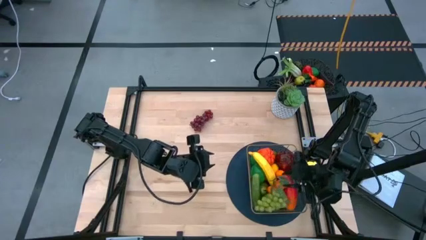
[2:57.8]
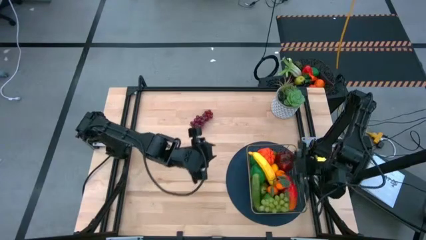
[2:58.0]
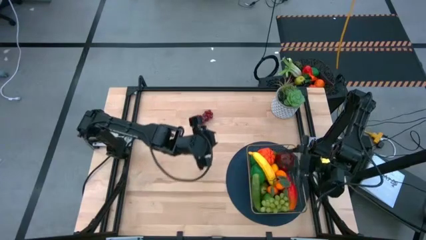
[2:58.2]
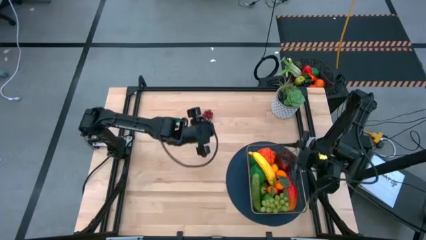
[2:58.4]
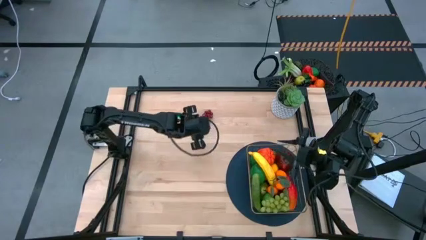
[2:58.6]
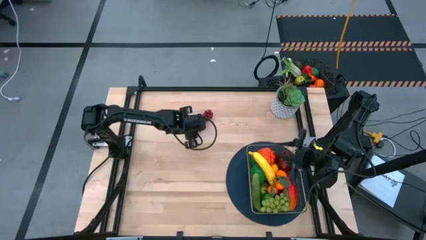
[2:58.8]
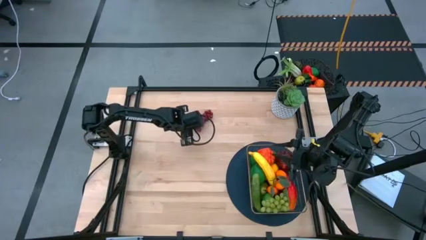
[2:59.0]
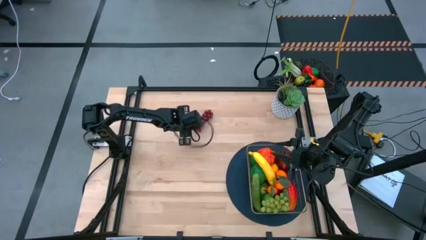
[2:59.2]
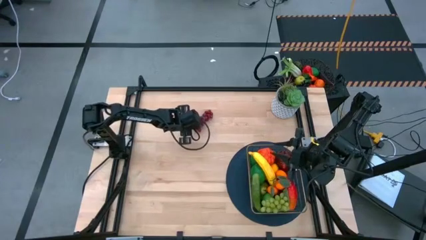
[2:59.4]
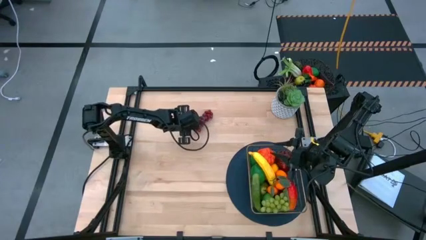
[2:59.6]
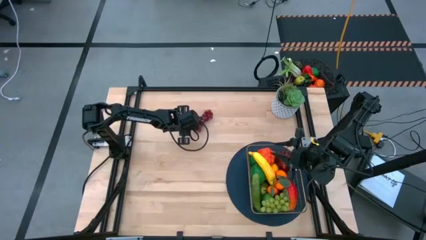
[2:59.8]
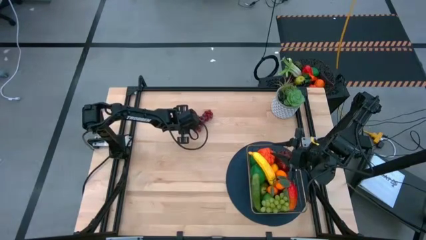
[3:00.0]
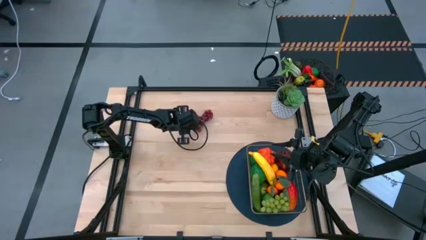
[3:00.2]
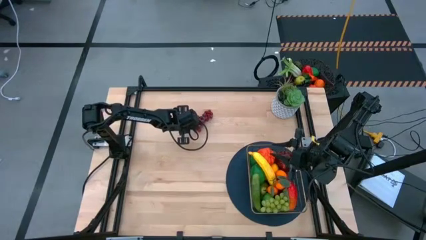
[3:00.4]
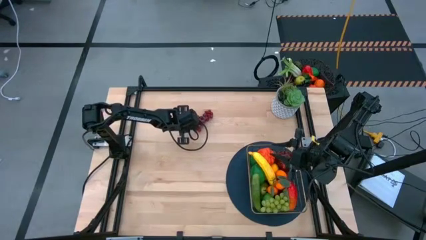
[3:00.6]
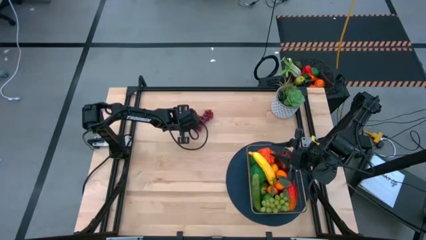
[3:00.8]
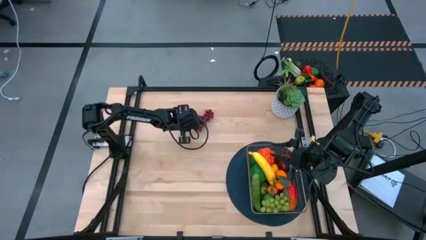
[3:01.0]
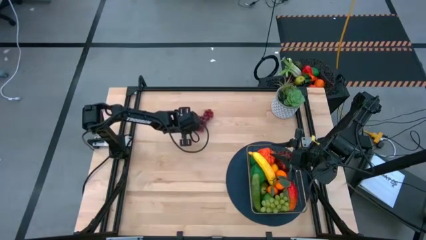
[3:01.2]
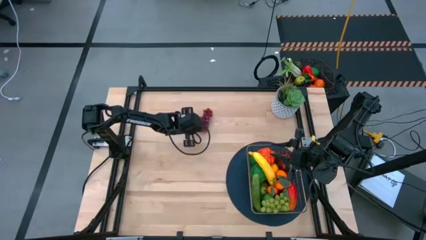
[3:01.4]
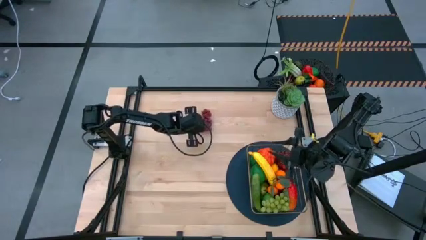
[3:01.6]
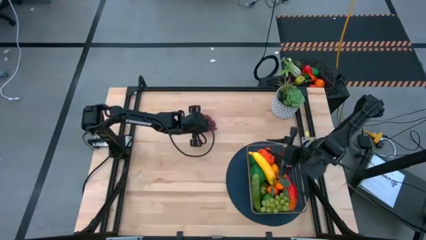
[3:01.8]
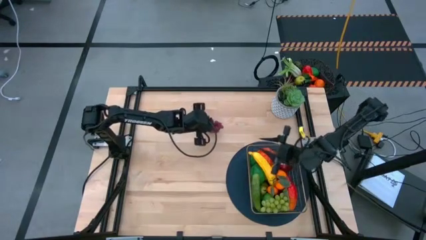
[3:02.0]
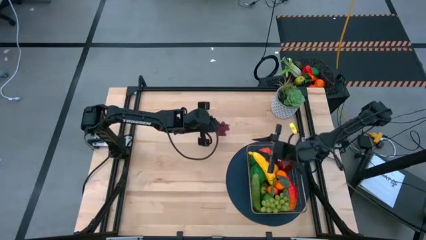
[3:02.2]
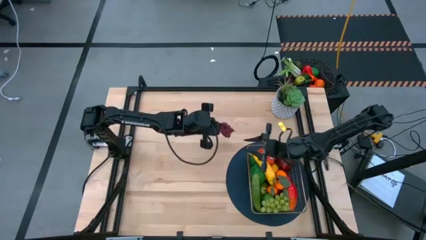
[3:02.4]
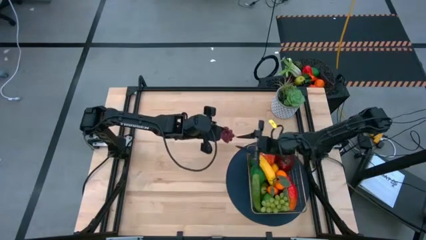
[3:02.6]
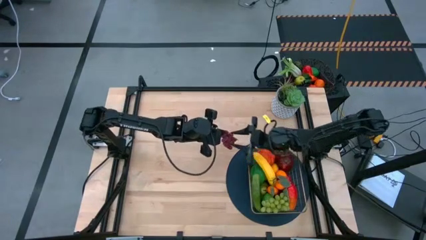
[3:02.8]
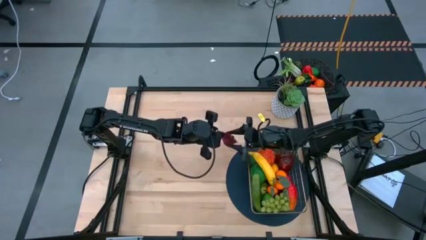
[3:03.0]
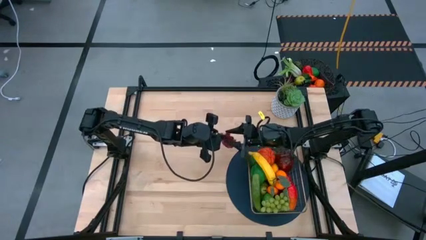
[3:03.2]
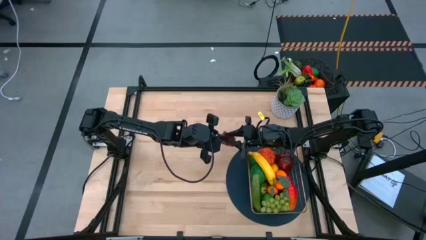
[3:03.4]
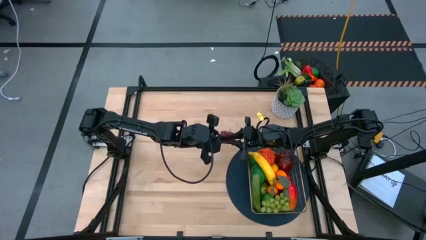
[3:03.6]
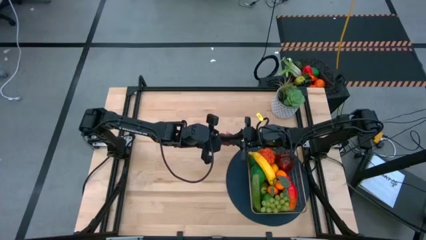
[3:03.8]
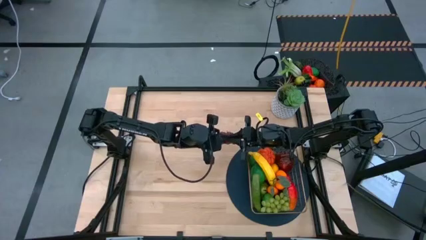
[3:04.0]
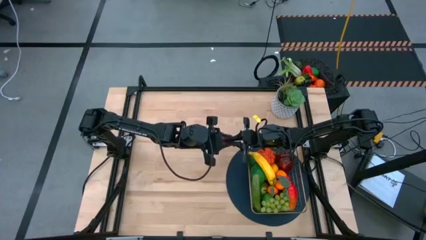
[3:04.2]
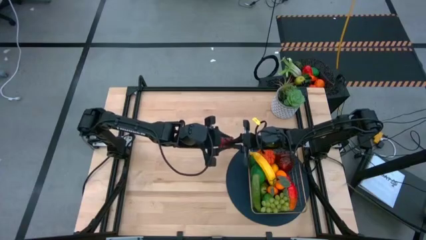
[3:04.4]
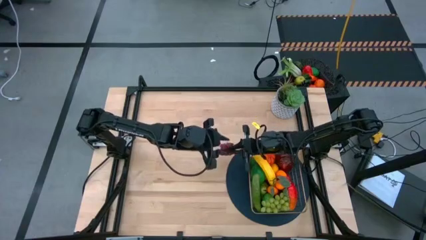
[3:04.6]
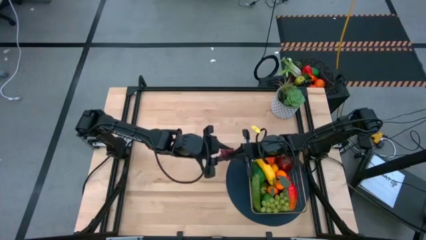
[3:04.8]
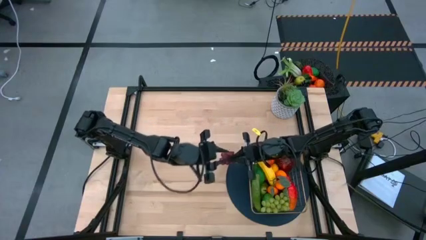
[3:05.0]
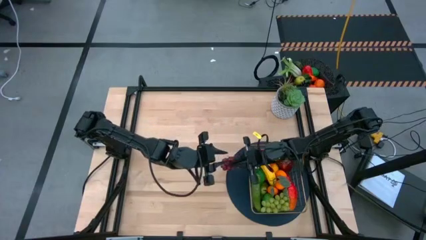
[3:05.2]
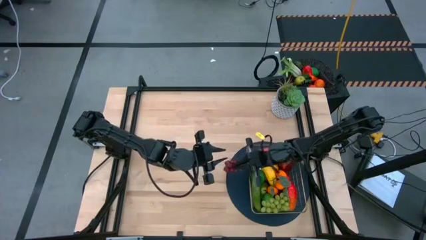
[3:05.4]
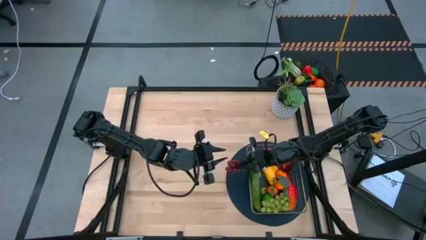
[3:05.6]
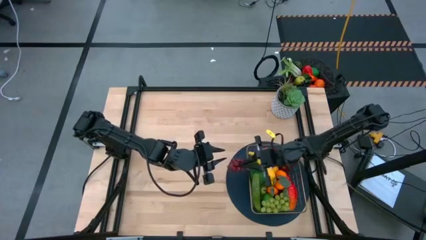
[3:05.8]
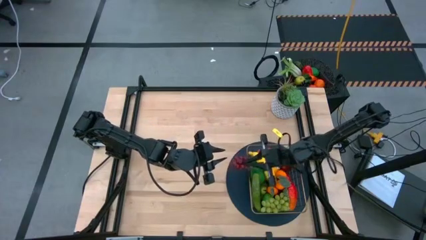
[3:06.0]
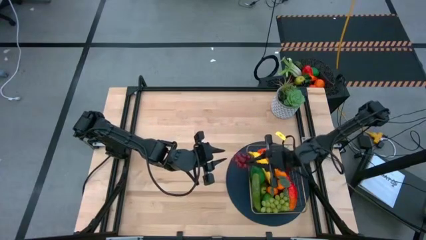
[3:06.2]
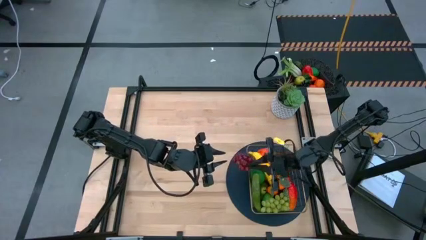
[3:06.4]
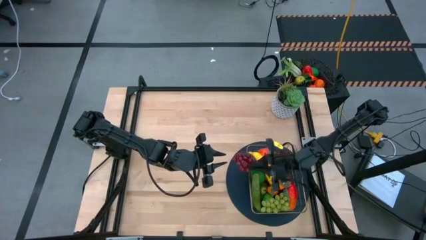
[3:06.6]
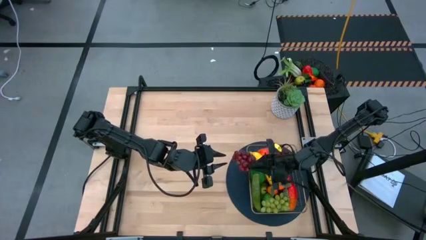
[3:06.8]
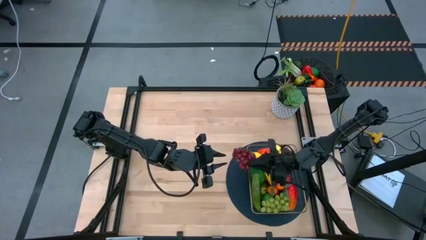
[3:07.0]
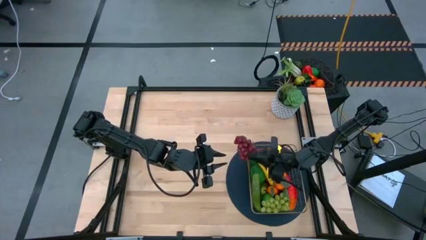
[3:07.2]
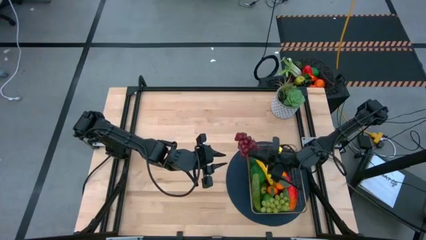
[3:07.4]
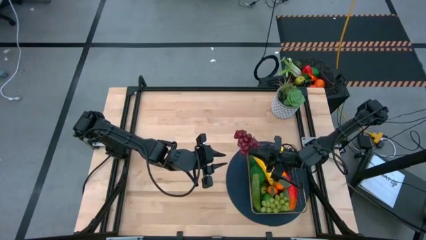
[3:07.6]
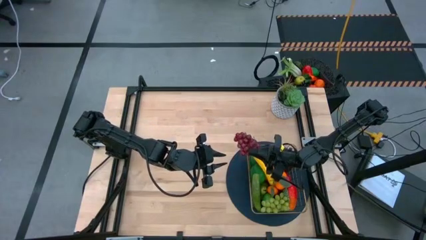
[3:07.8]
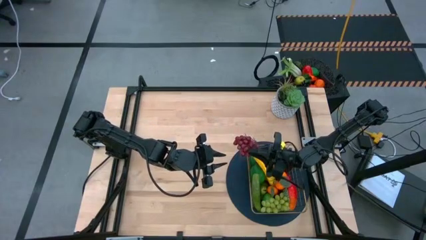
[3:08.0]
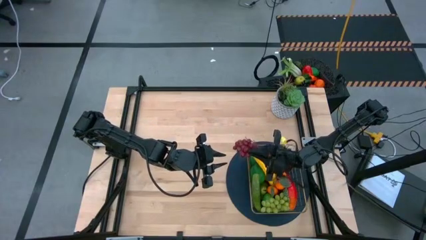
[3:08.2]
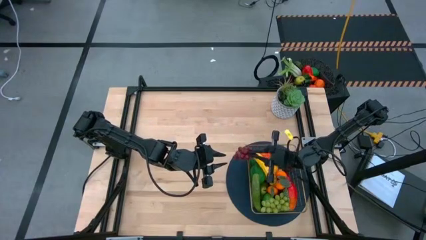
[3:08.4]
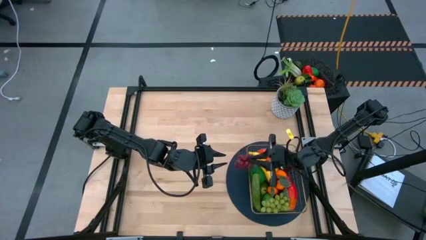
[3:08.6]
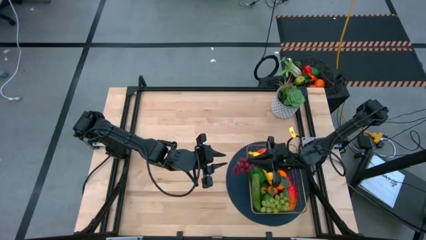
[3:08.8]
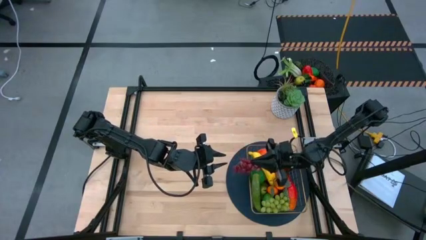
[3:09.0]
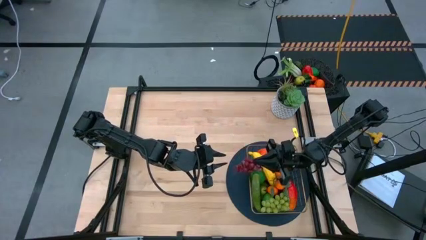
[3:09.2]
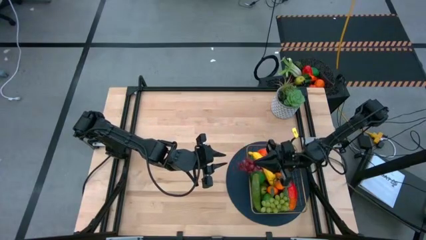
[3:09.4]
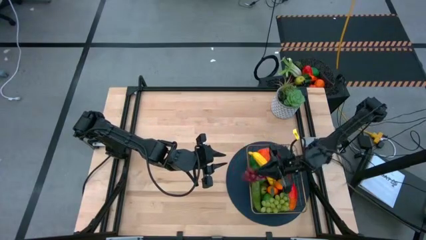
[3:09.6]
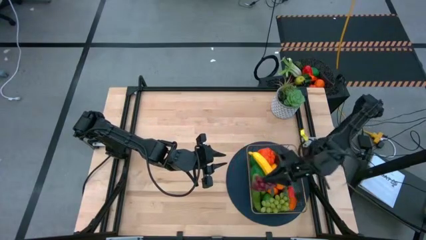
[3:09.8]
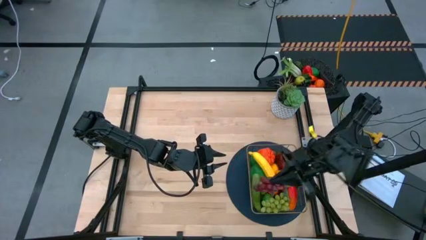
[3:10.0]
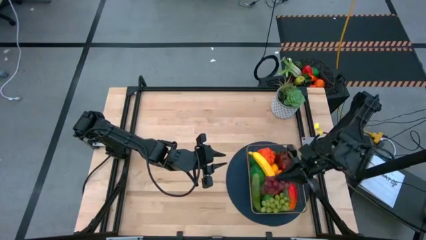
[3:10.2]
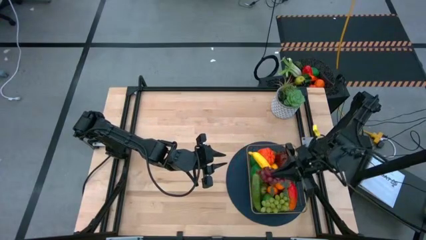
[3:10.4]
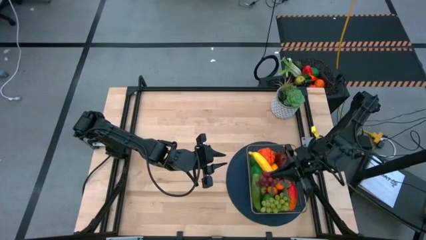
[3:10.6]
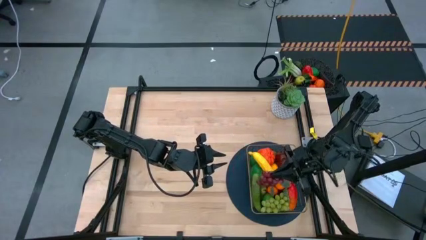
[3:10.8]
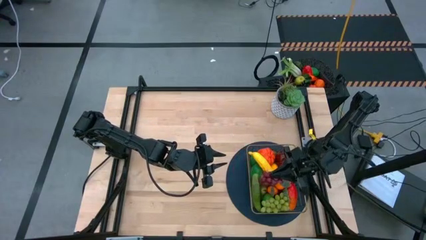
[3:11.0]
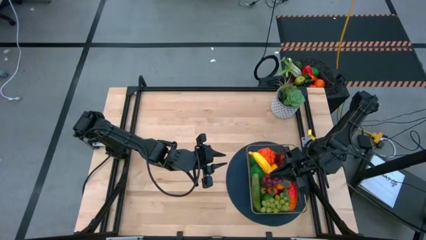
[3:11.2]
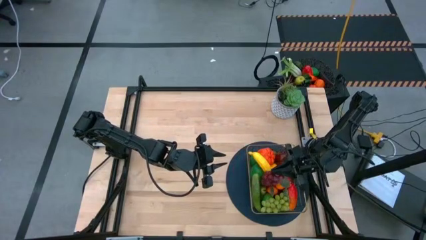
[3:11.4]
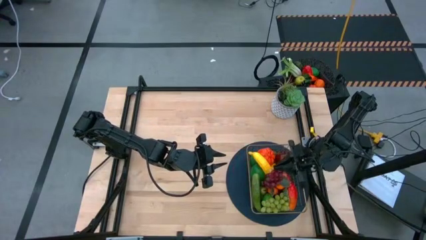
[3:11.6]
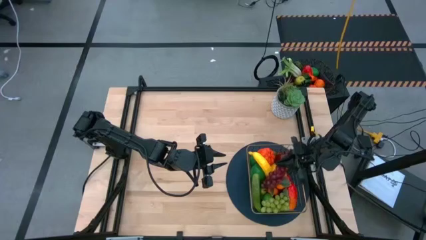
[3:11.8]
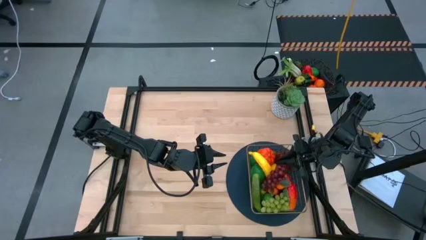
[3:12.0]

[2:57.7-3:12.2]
Task: Build produce basket
Put the red grapes into the wire basket

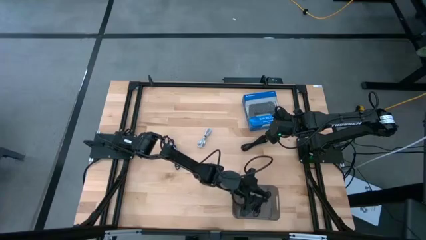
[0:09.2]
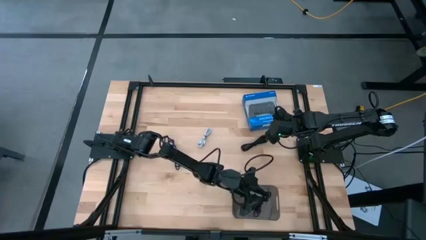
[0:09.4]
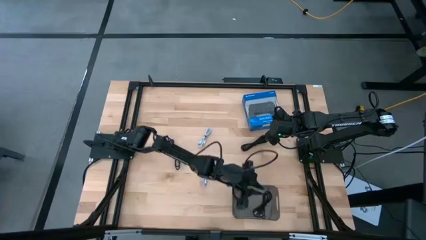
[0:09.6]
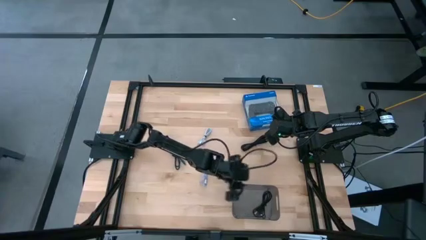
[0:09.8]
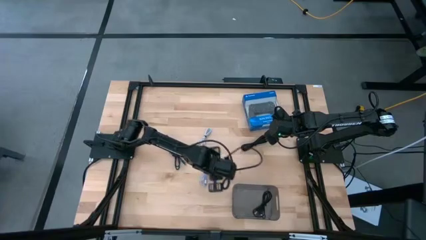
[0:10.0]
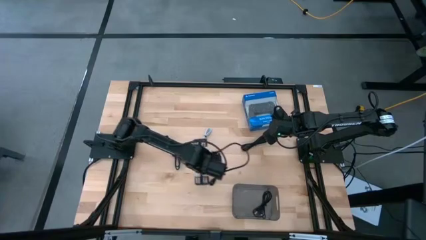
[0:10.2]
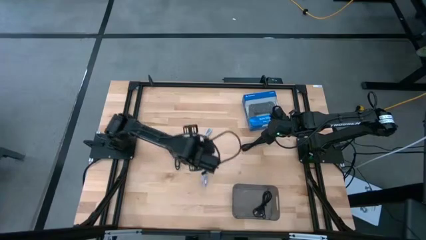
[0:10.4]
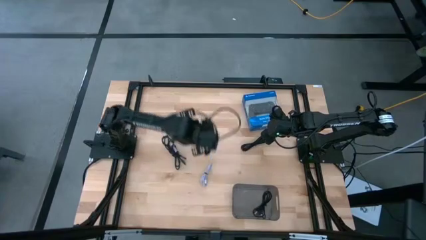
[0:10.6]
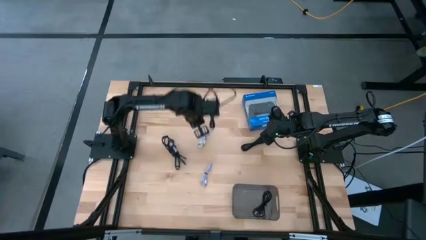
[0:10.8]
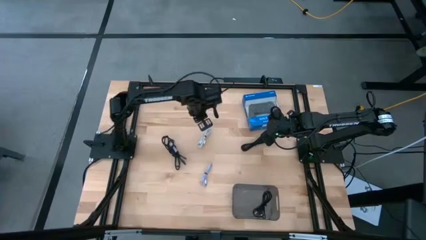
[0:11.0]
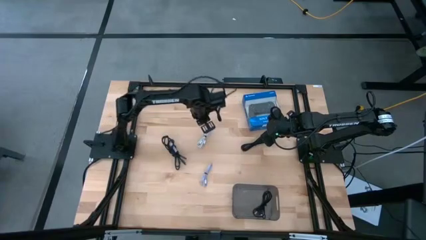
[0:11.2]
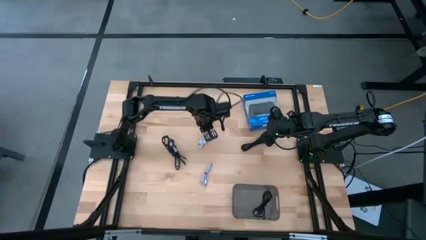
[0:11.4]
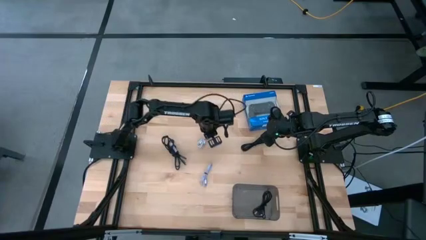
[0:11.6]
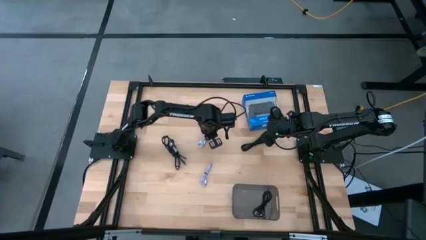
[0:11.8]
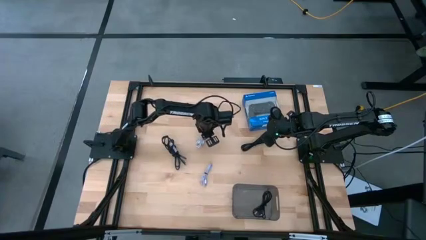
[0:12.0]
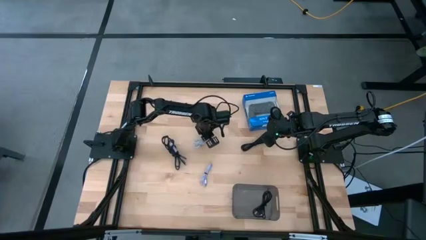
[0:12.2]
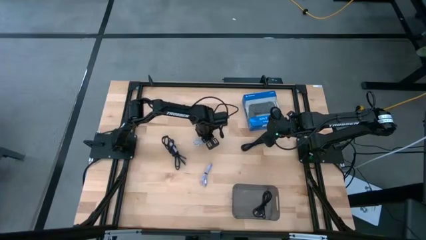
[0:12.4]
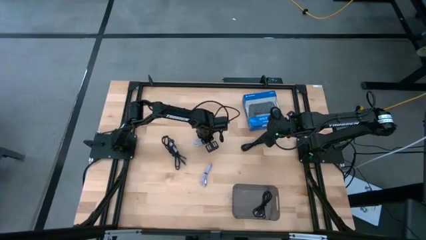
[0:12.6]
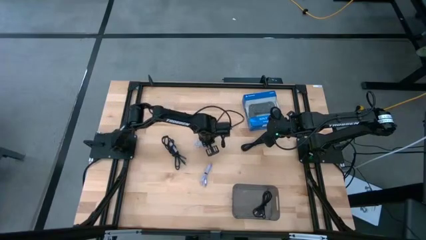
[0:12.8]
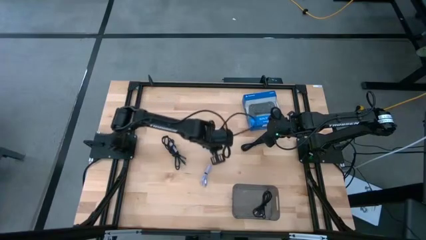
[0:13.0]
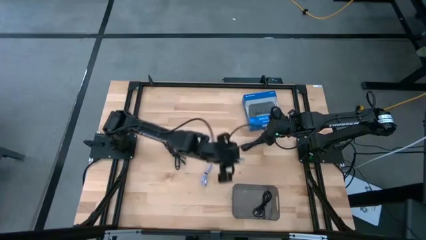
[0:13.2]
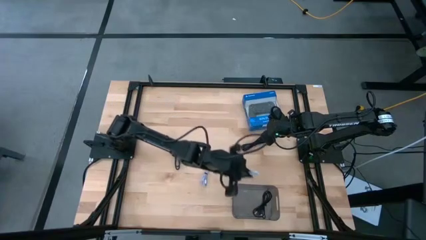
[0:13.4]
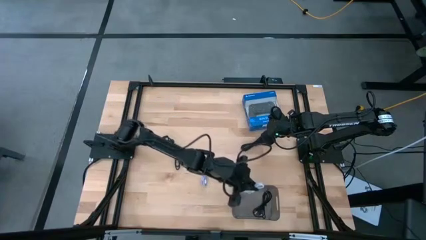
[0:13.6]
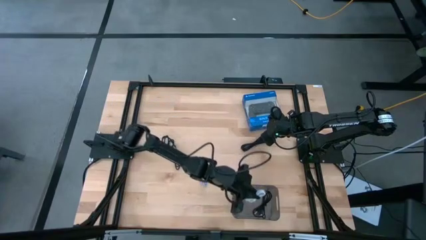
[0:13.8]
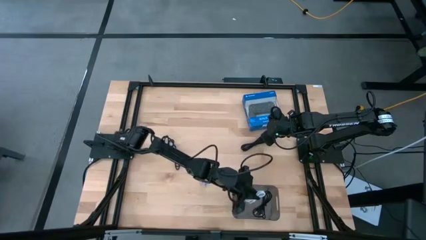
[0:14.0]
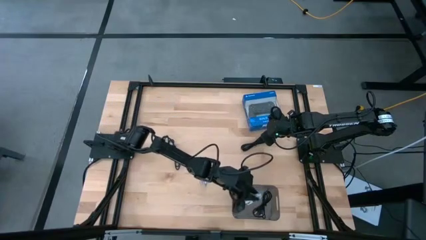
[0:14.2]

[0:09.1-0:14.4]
Task: Pick and place USB-C Cables
Put the top white charger cable into the black bin
